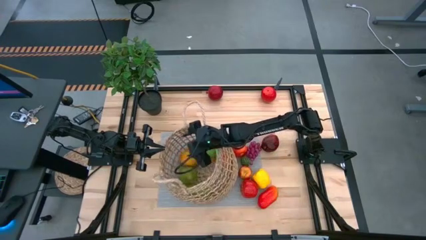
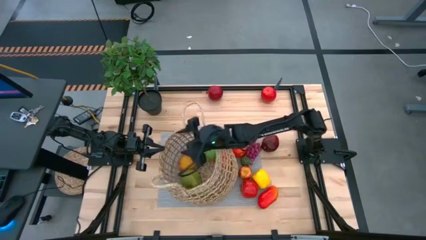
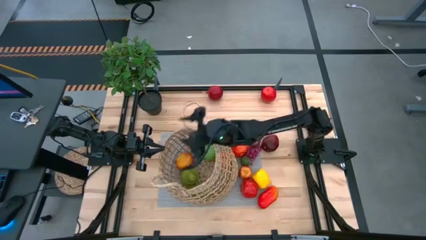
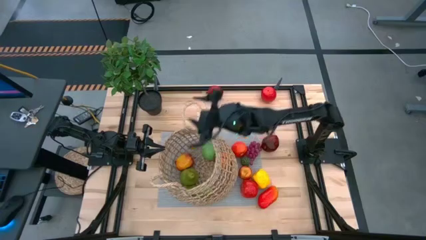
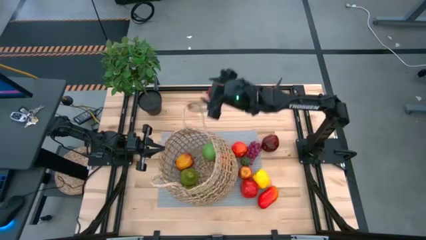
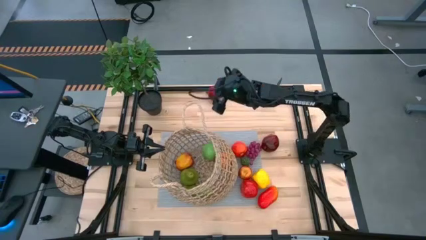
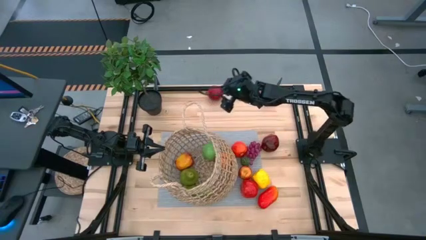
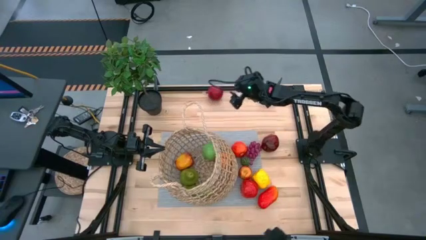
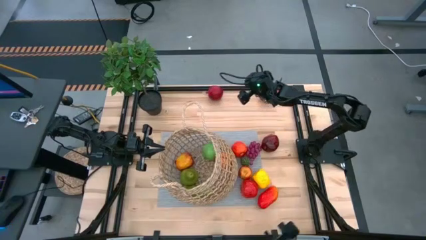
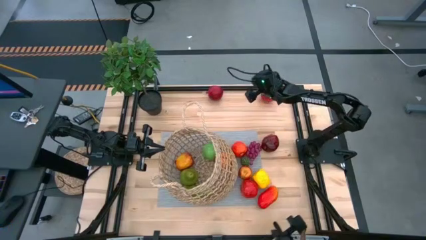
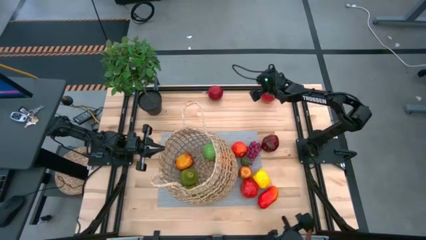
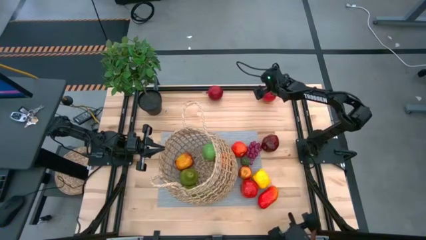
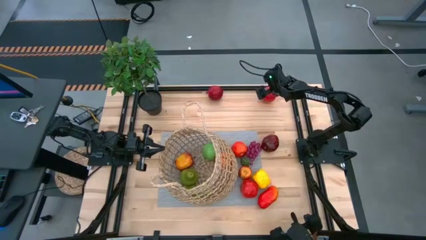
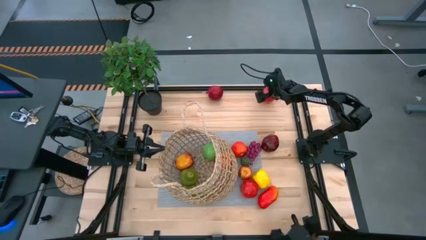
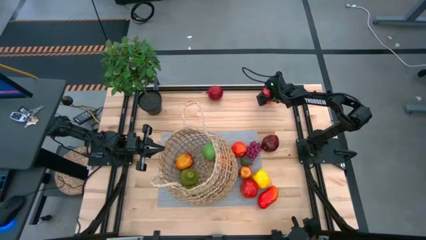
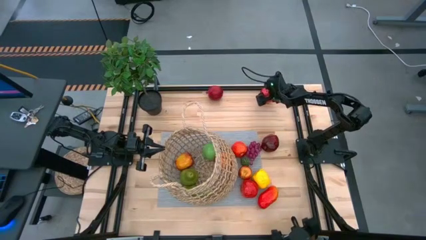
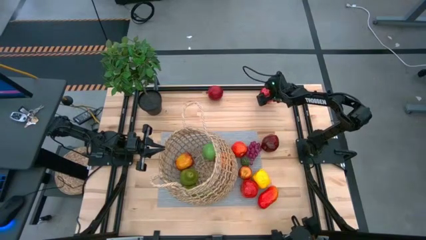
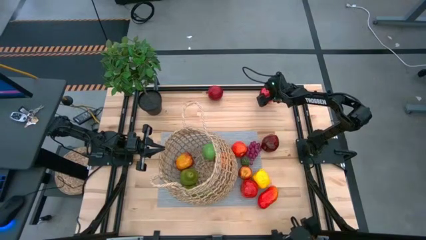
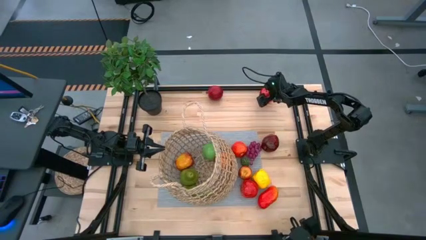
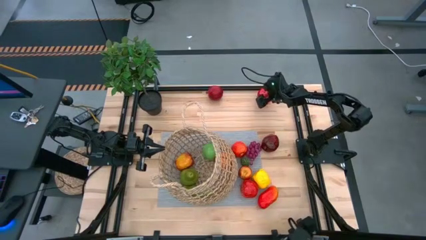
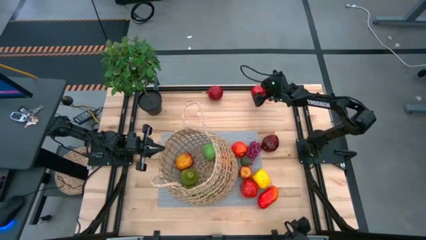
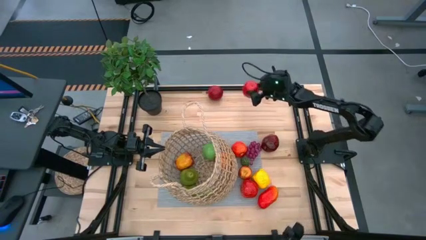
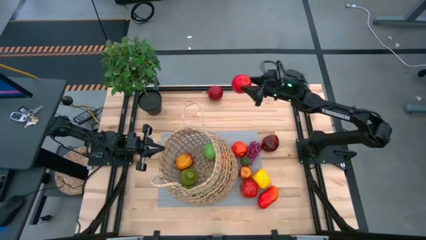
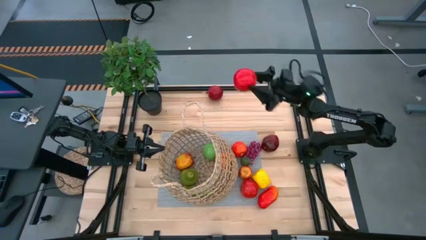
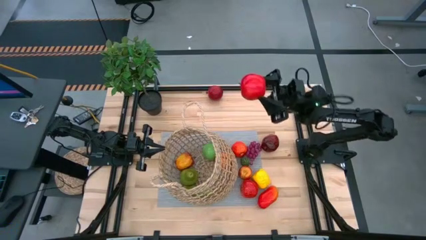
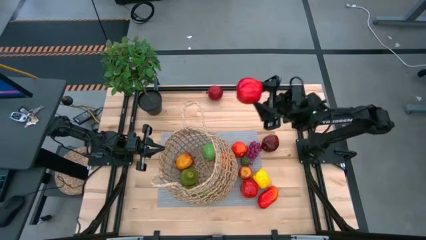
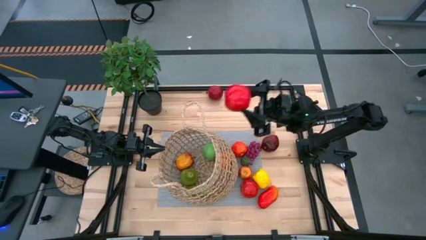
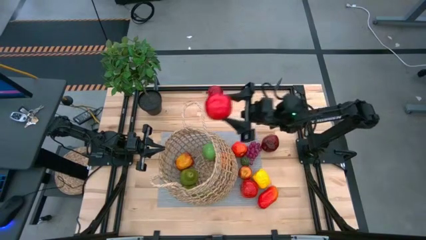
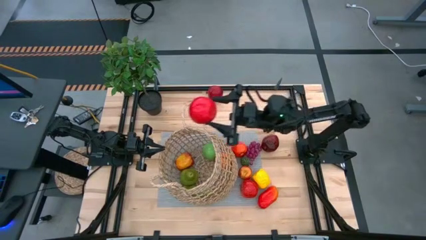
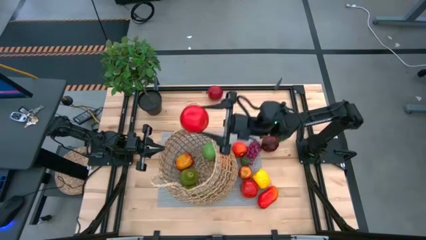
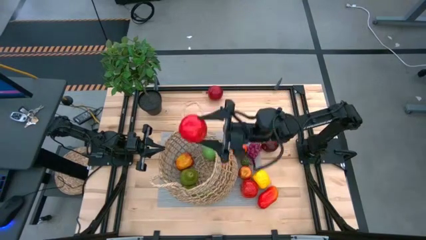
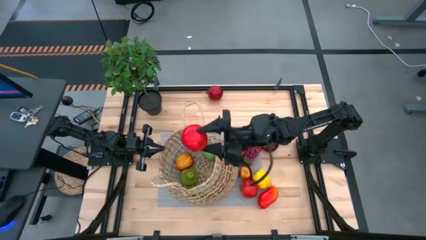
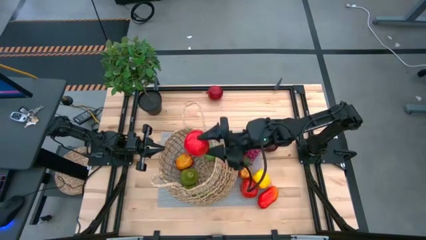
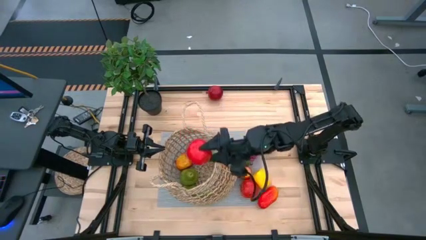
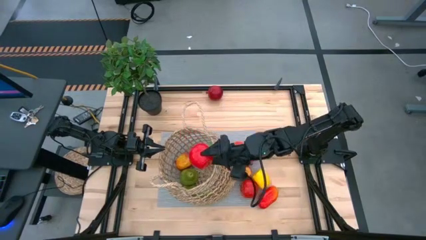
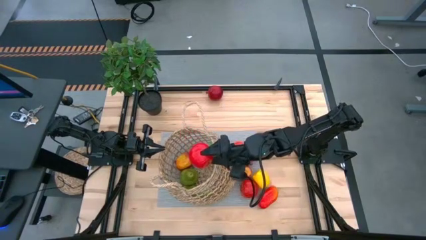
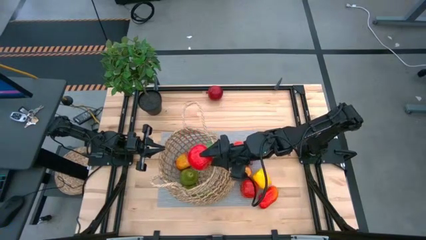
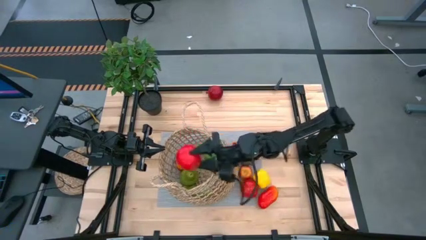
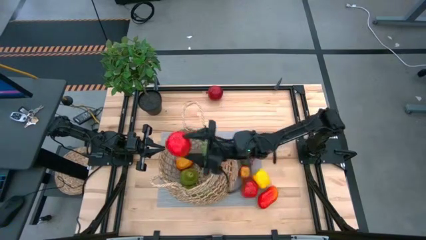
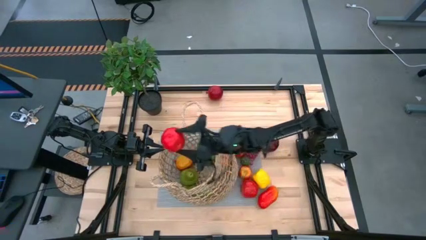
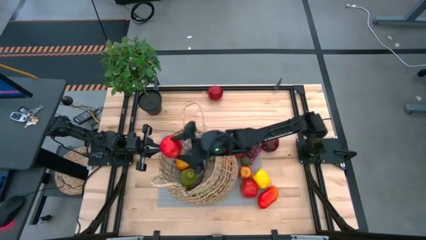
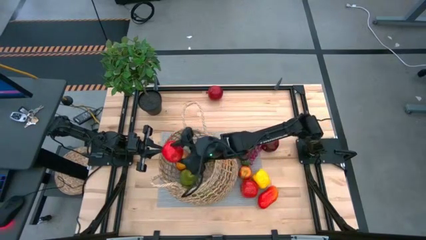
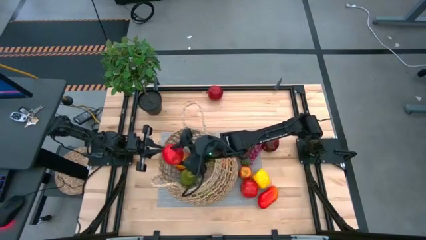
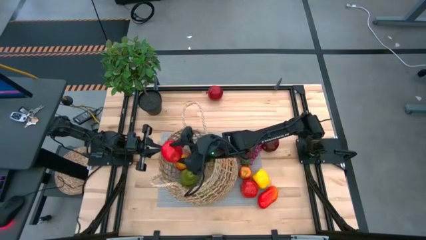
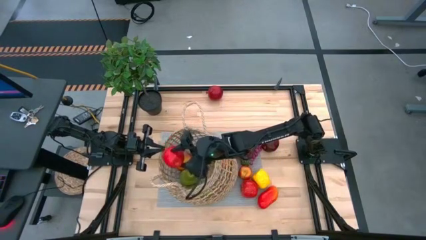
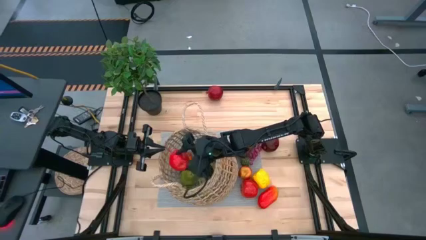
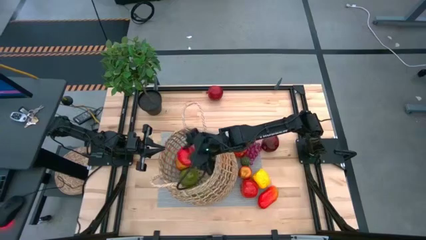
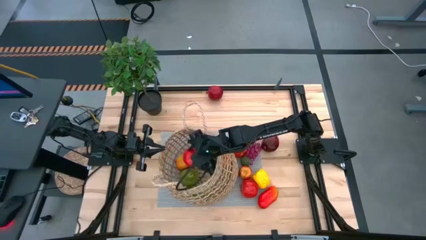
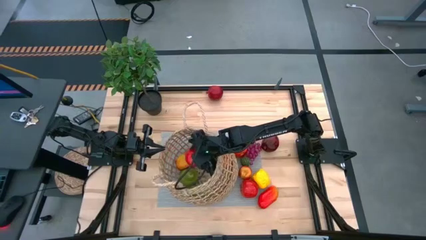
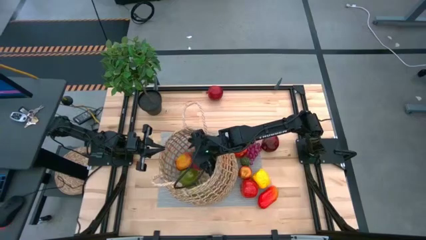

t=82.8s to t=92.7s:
Task: Build produce basket
Put the red apple into the brown basket

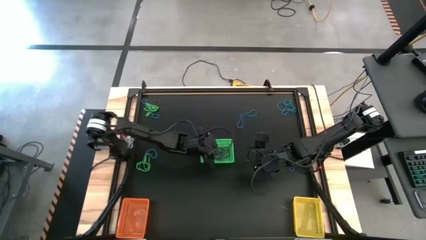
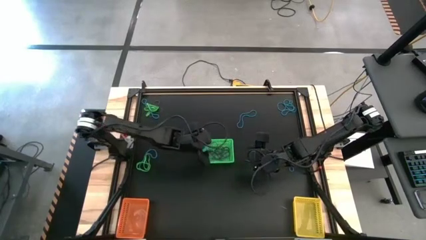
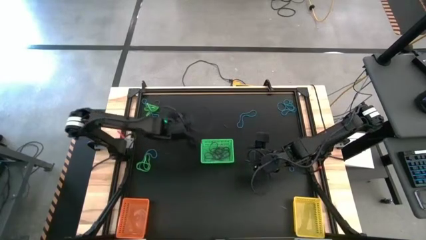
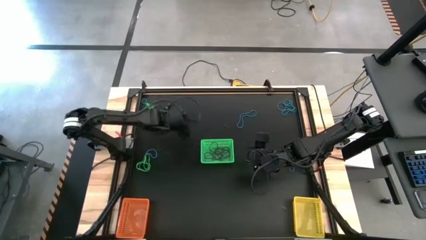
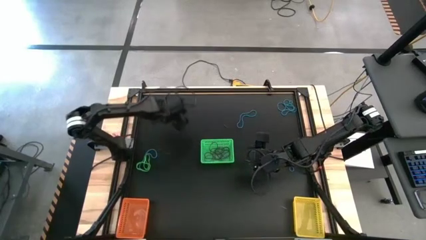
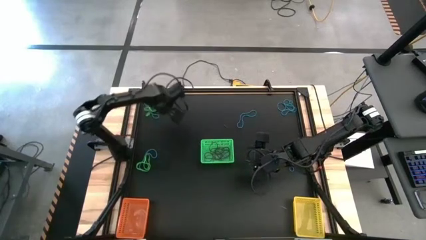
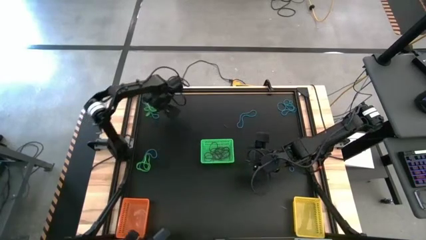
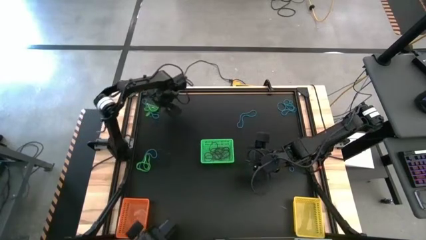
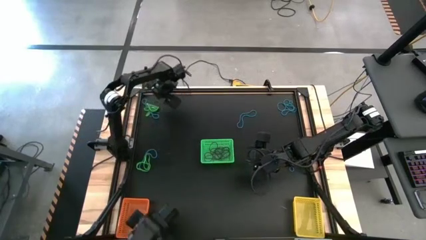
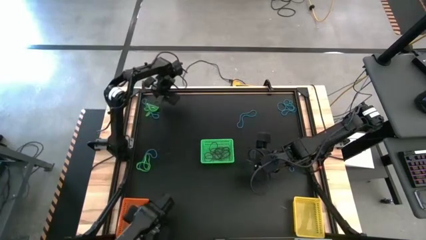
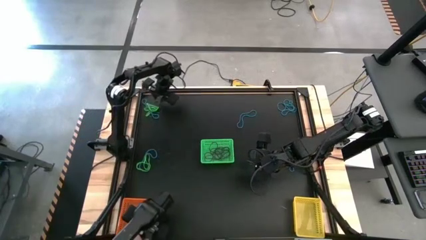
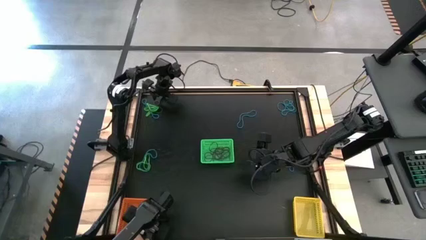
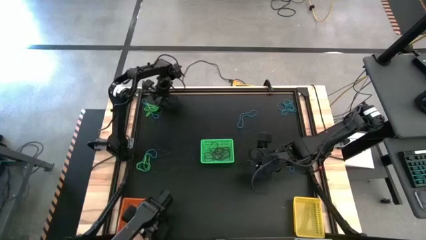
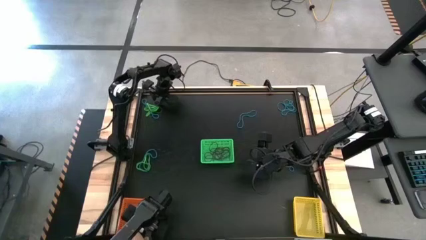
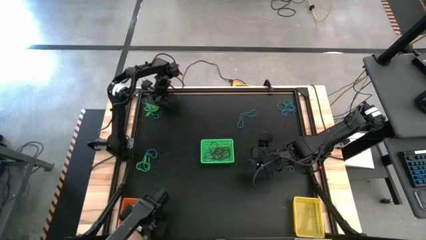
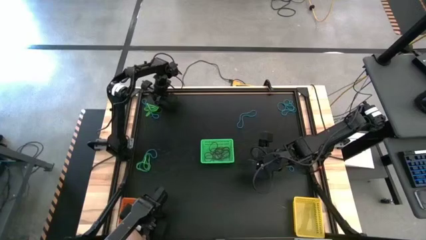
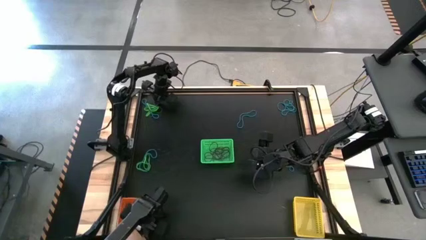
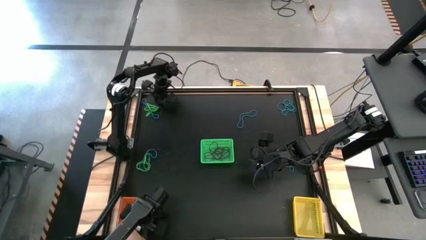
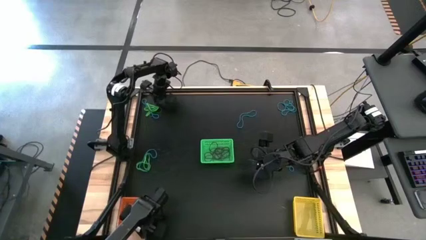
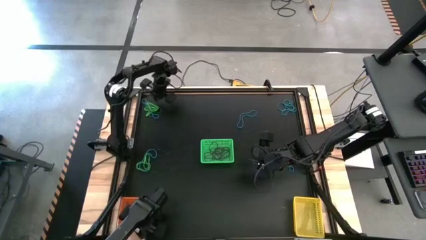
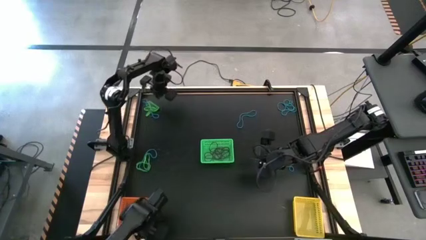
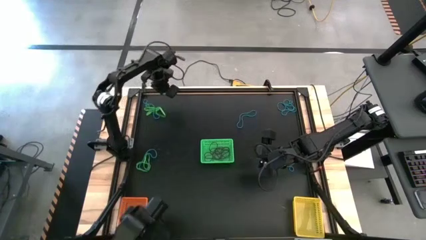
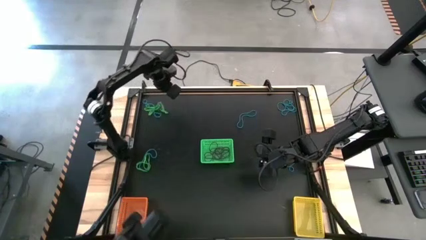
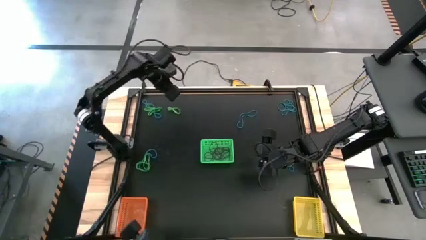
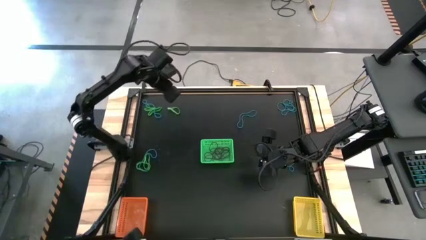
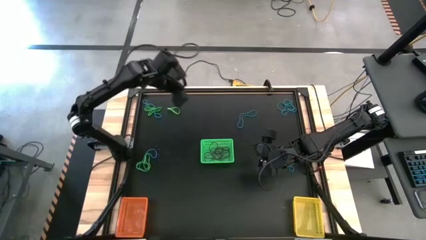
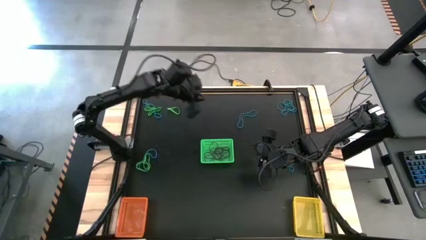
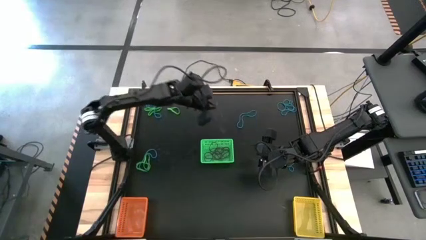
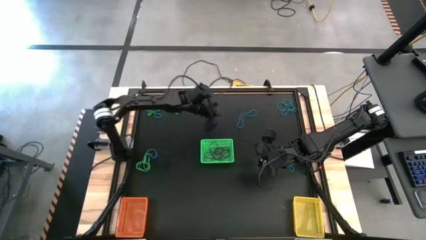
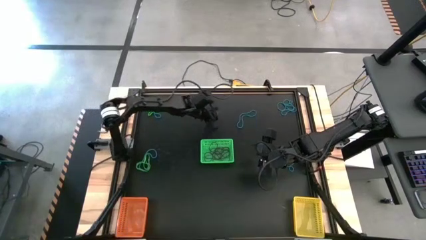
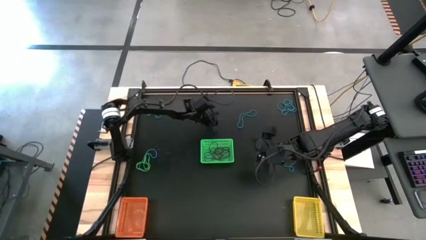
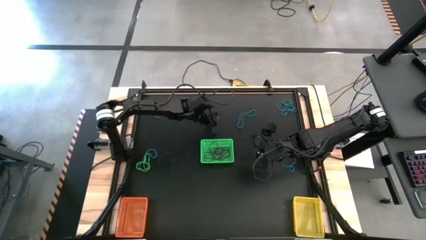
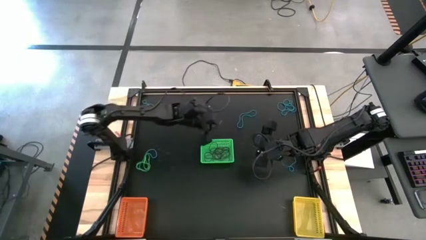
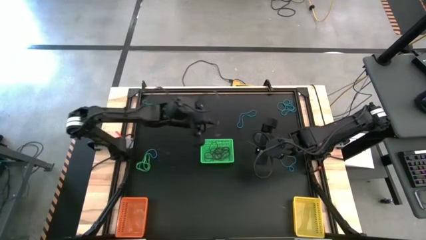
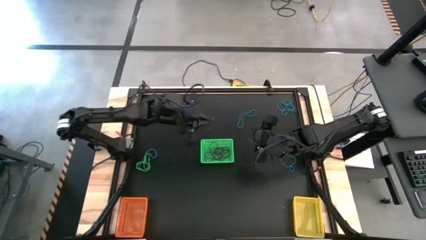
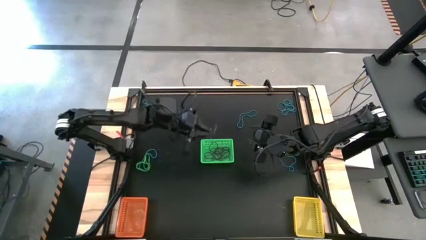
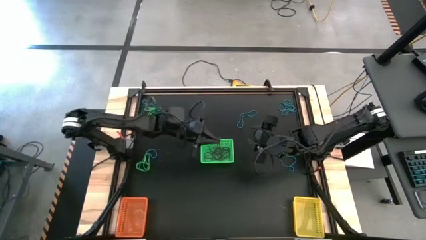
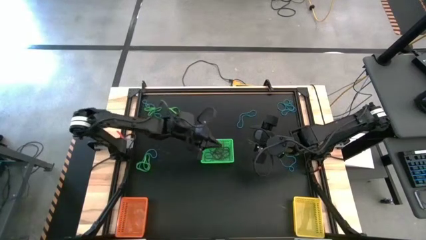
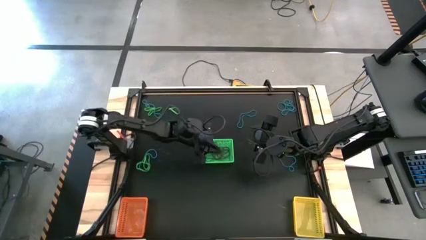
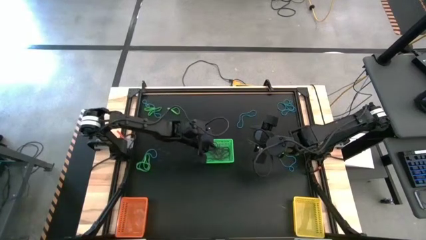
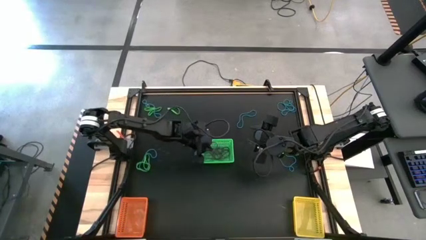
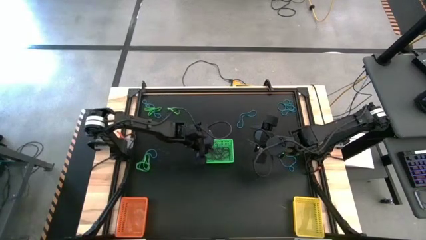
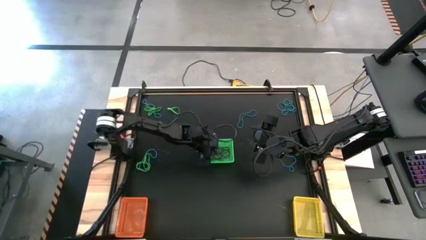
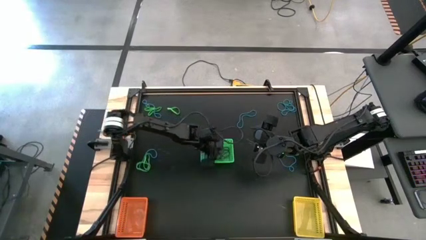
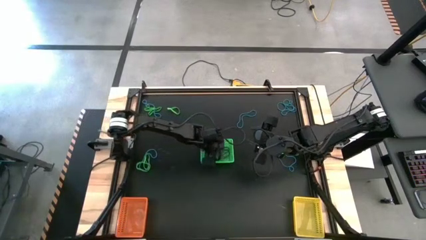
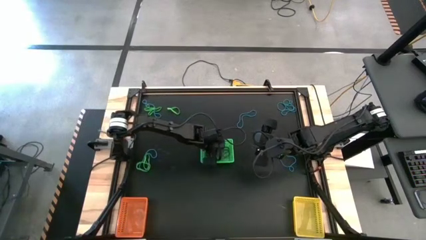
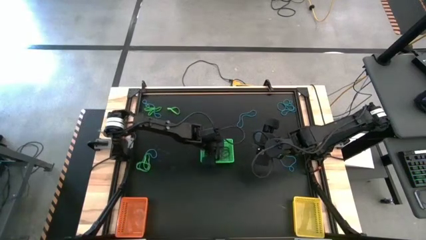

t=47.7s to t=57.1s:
Task: Sort rubber bands into baskets
Put the violet rubber band into the green basket
